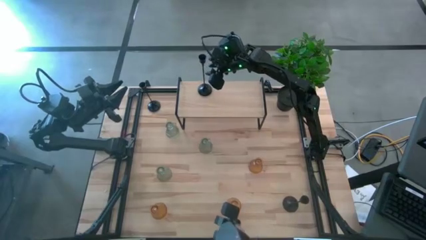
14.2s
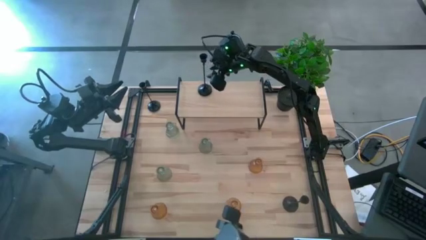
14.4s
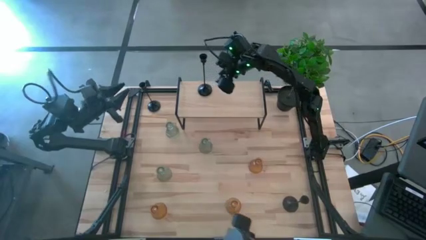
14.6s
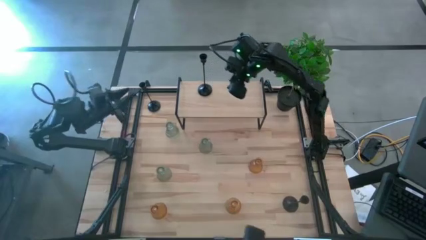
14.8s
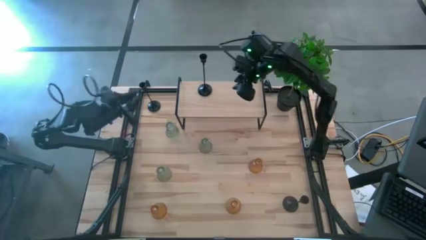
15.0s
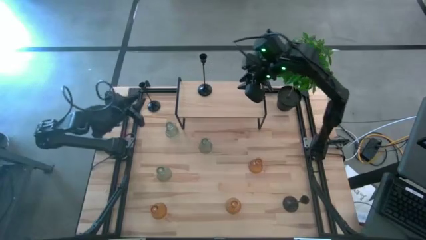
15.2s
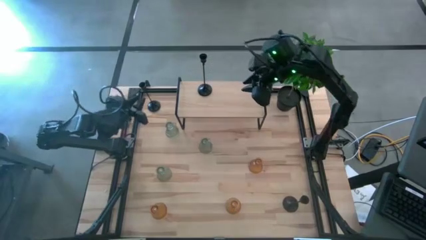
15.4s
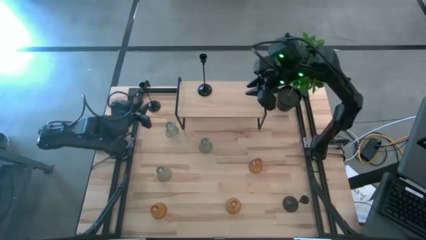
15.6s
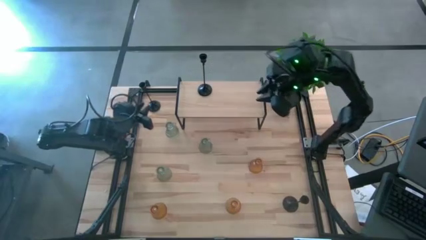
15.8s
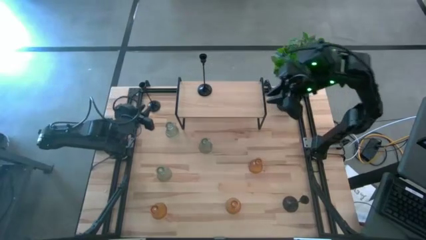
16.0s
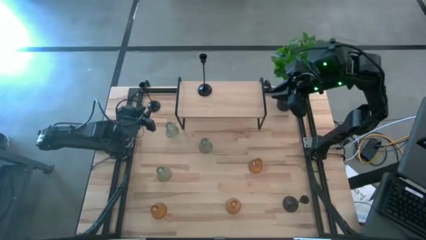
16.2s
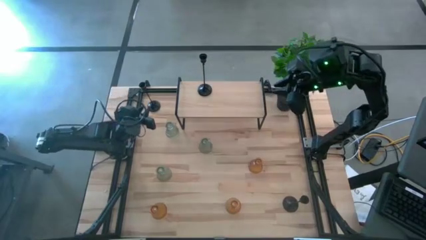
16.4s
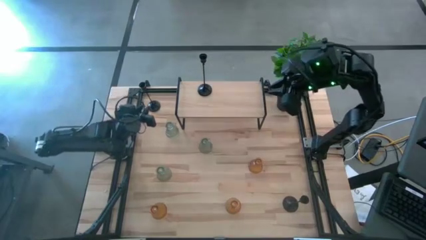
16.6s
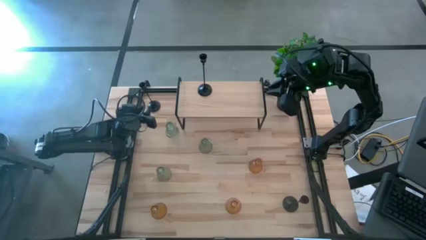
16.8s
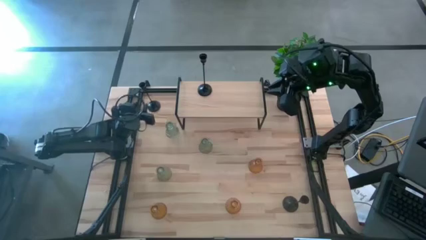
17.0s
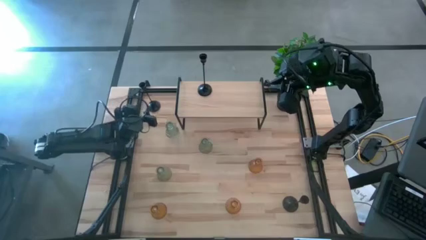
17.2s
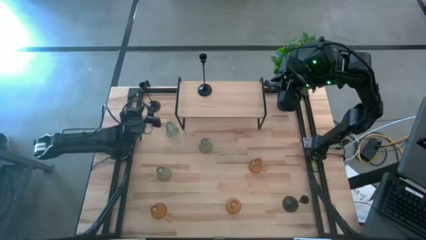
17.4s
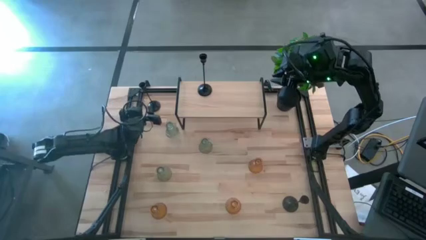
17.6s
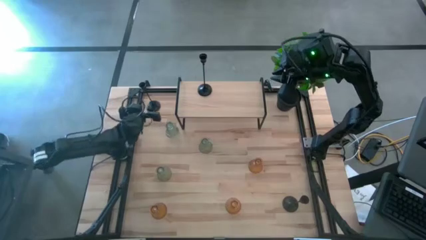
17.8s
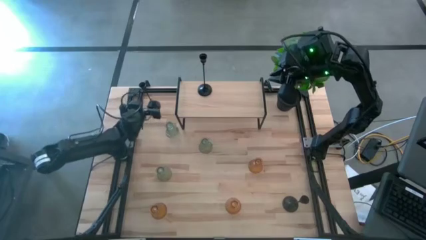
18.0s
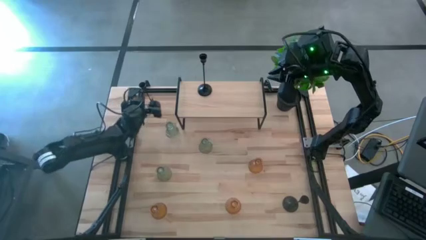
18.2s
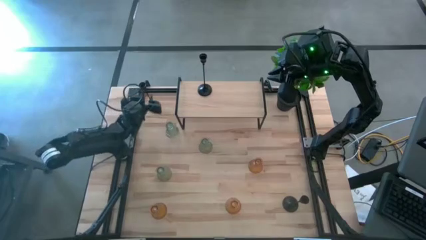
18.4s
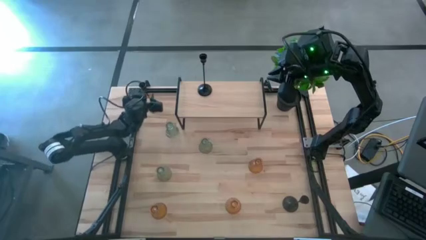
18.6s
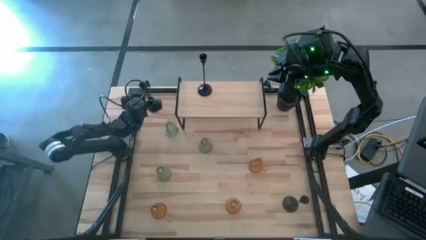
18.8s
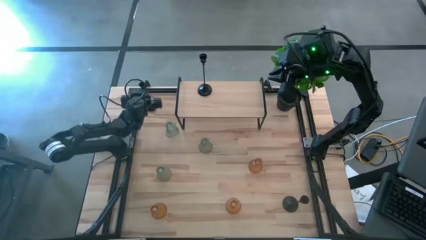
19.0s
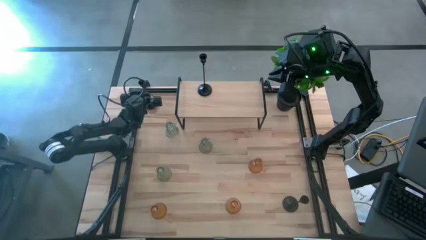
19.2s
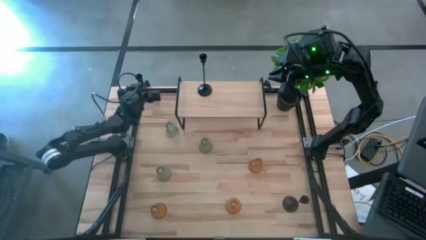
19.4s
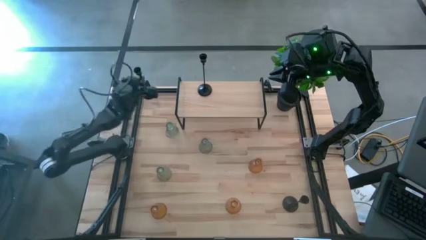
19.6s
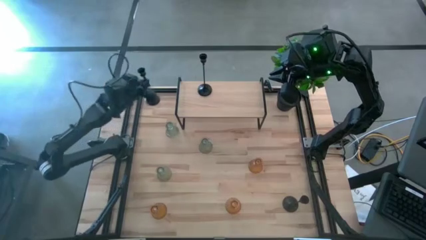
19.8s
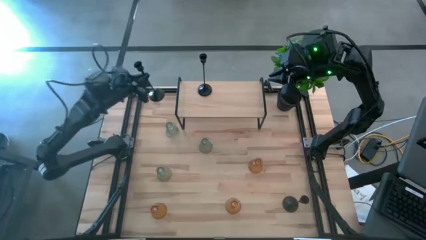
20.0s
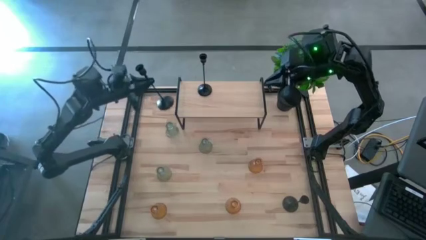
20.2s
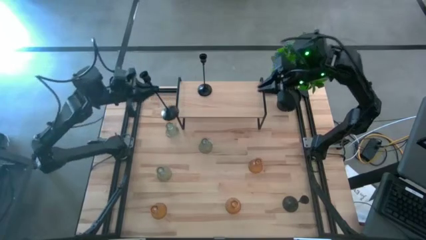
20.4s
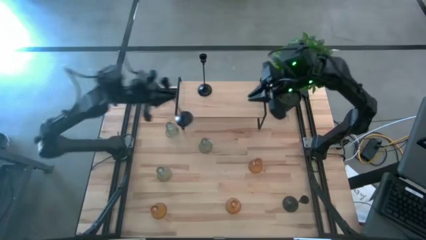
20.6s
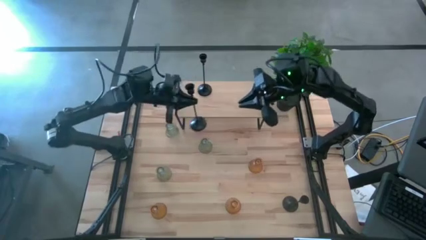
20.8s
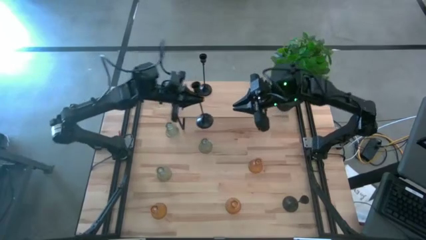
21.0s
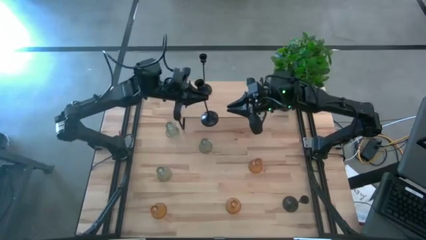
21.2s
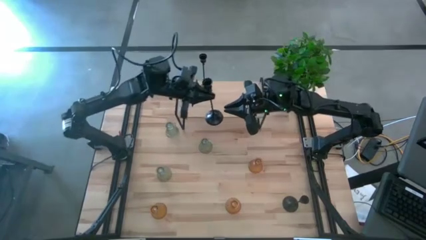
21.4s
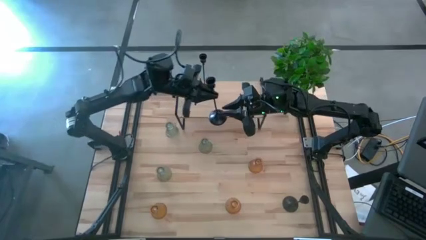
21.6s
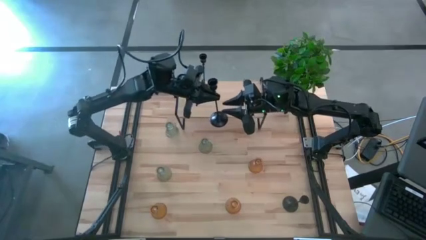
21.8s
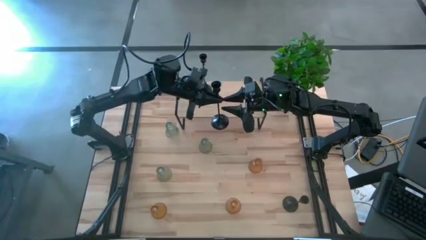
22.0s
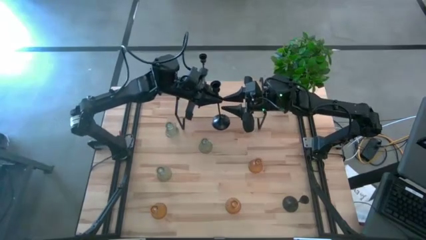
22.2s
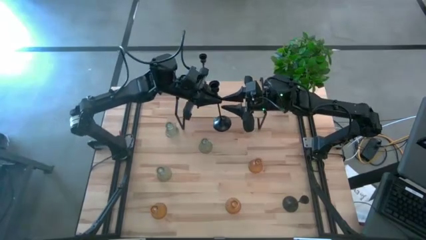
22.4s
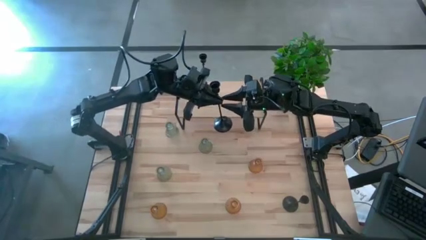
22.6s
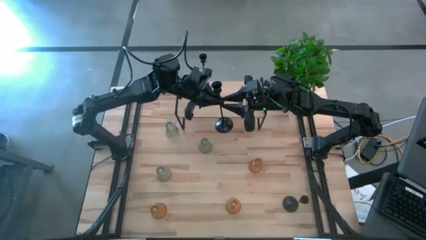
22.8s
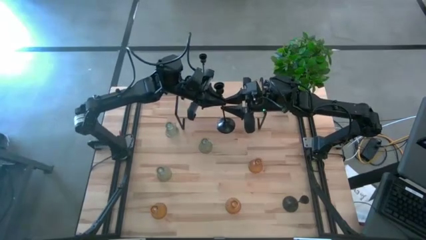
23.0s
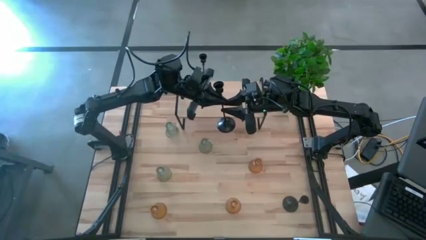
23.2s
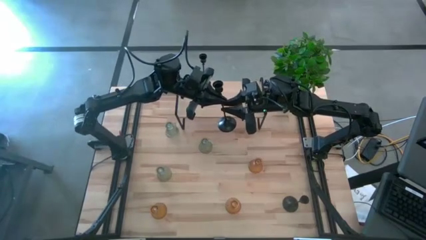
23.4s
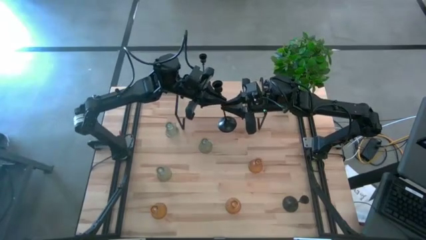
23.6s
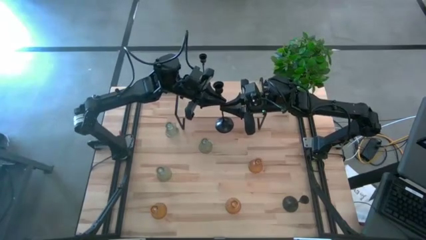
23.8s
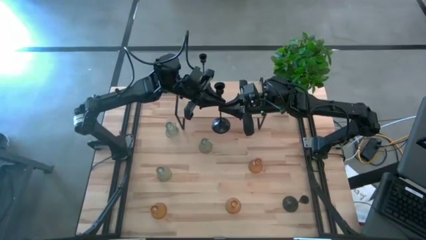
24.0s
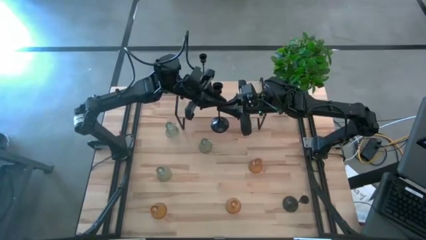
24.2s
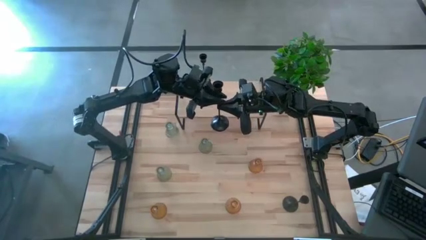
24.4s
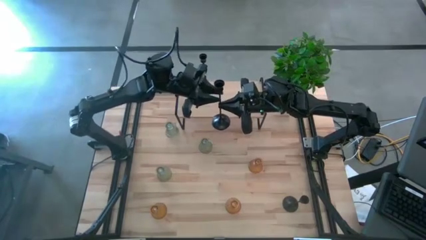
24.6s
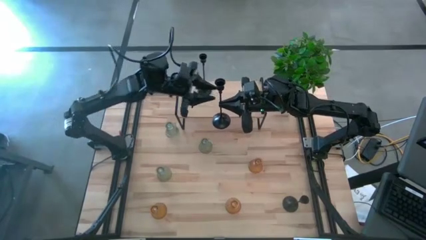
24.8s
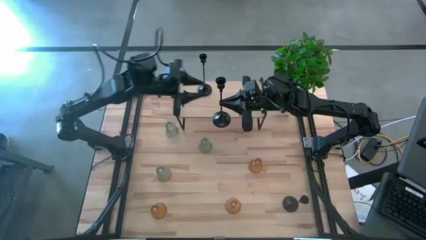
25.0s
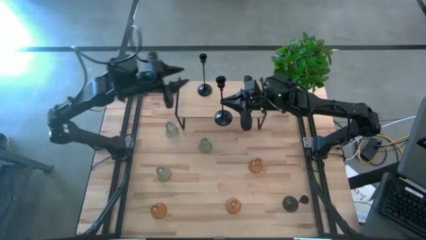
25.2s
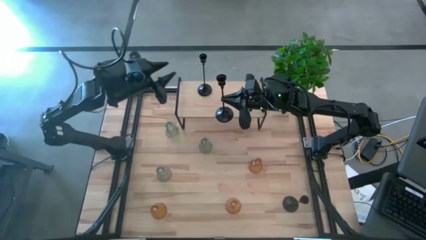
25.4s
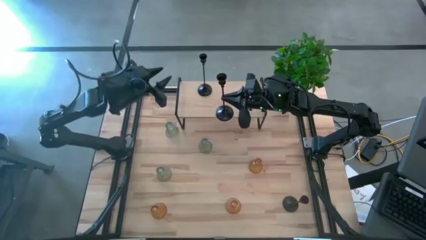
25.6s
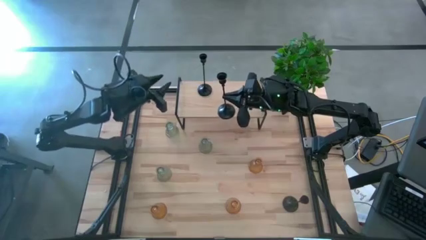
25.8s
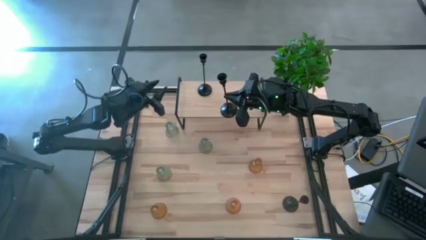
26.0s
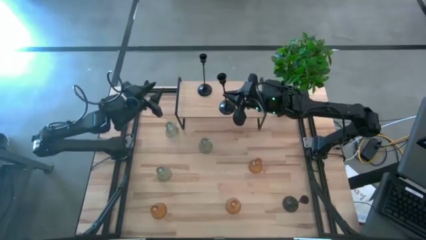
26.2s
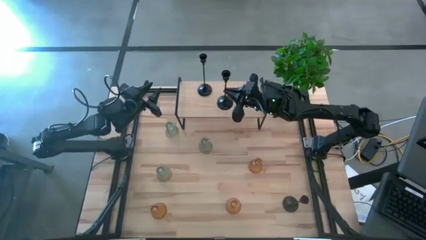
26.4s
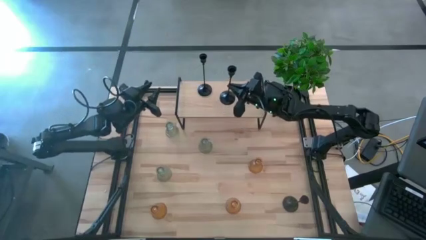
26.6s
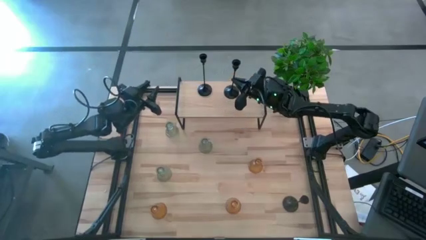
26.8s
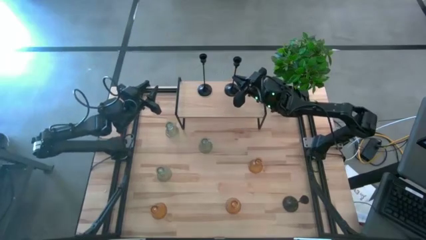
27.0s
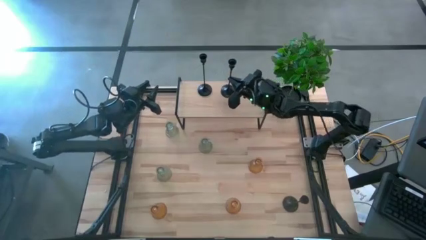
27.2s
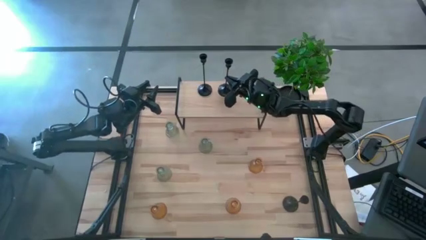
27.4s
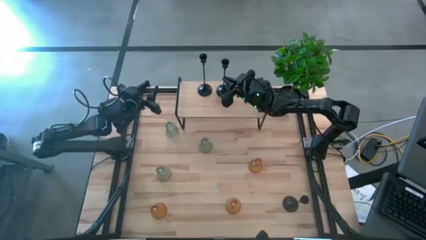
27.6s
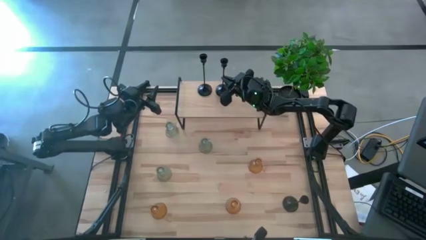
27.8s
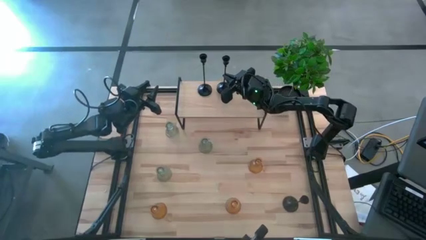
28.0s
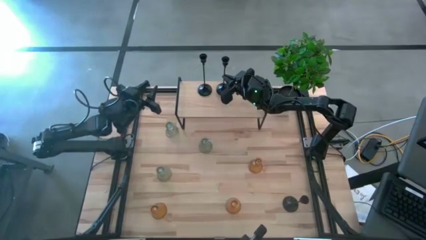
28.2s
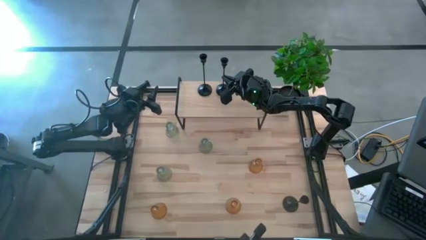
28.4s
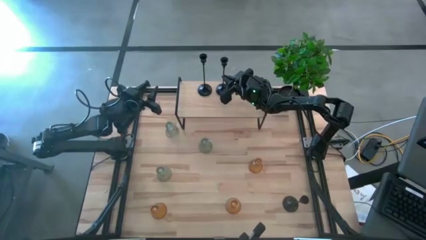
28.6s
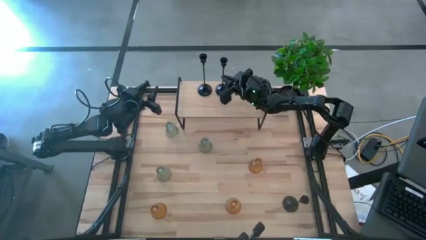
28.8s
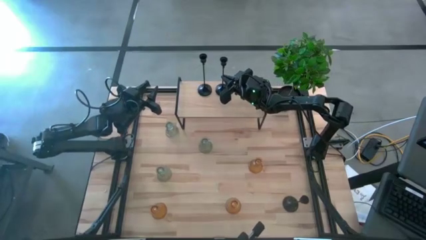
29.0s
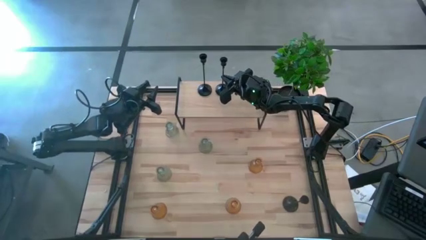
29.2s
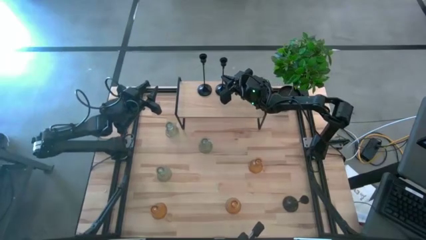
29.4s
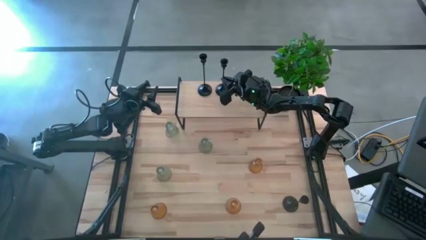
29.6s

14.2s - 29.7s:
Task: Pick & Place candle stick holders
Put the left black candle holder on the shelf
